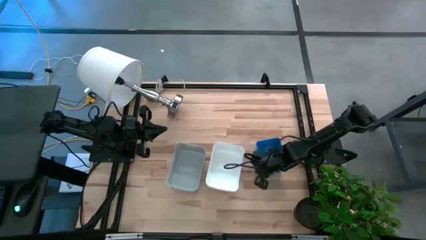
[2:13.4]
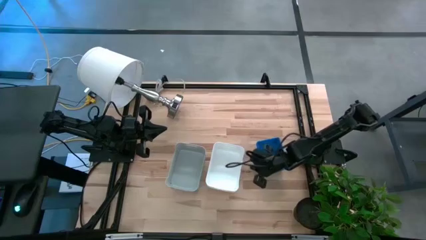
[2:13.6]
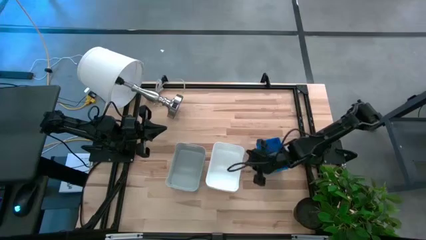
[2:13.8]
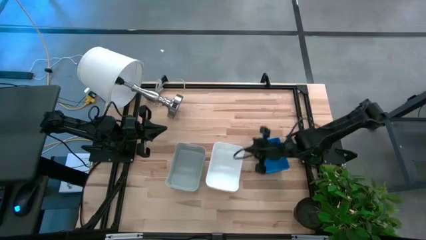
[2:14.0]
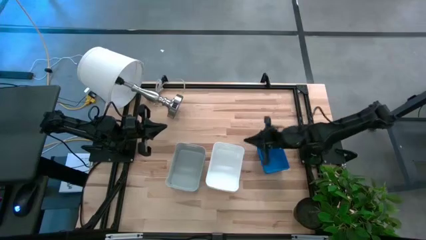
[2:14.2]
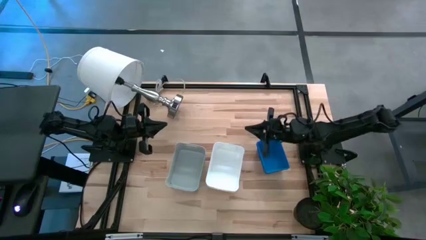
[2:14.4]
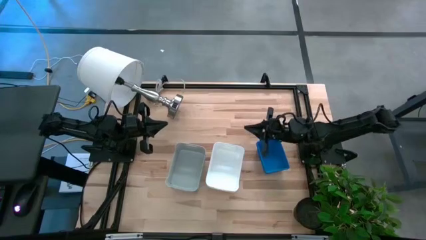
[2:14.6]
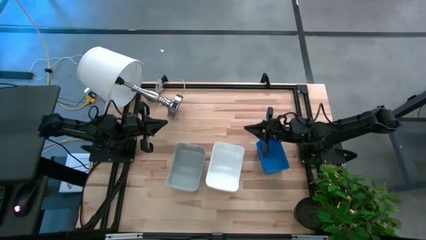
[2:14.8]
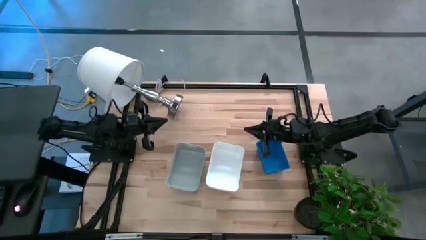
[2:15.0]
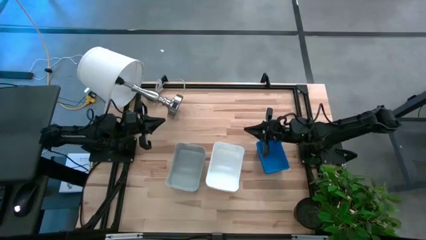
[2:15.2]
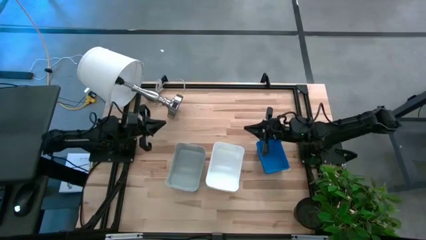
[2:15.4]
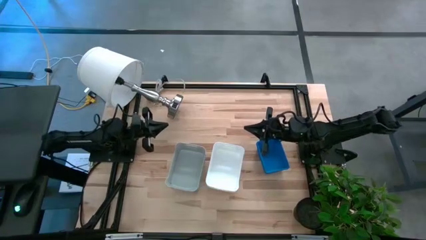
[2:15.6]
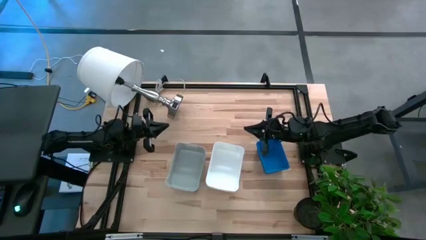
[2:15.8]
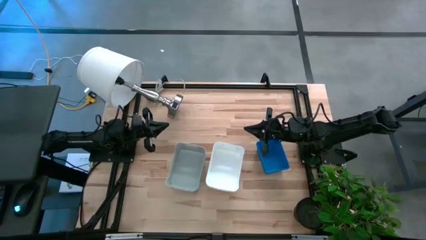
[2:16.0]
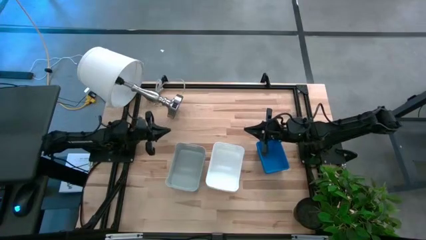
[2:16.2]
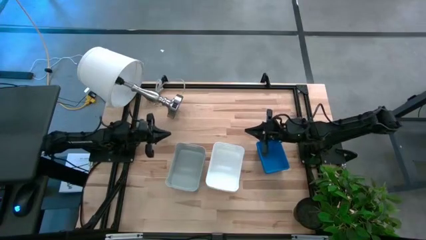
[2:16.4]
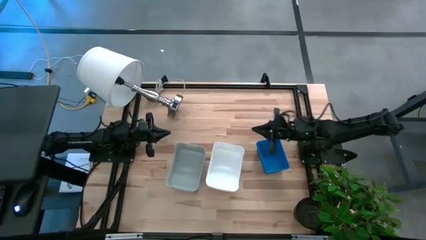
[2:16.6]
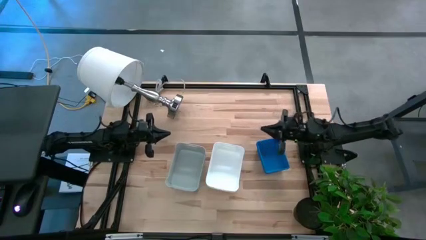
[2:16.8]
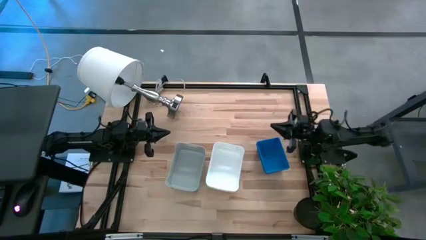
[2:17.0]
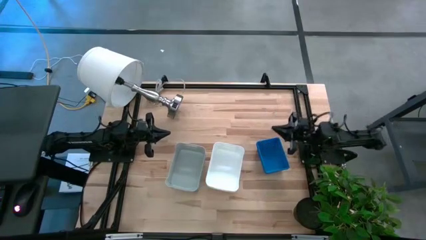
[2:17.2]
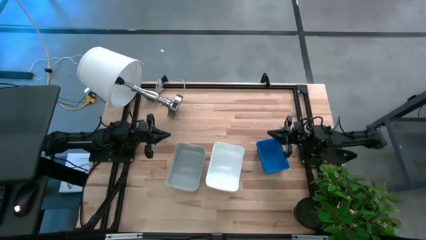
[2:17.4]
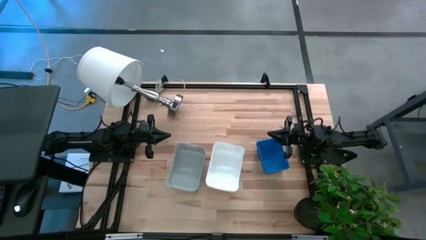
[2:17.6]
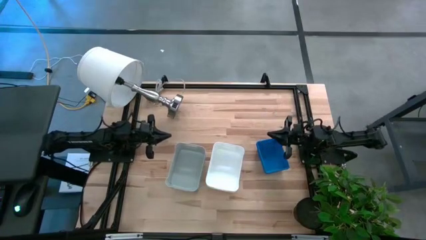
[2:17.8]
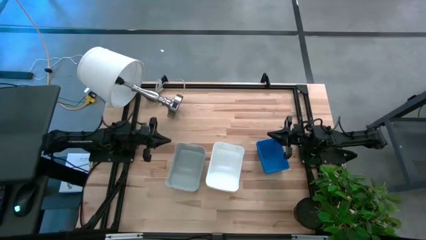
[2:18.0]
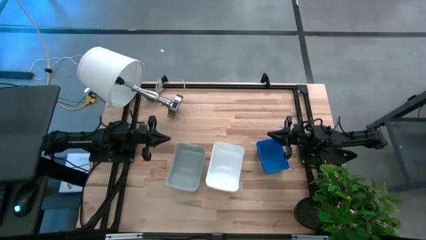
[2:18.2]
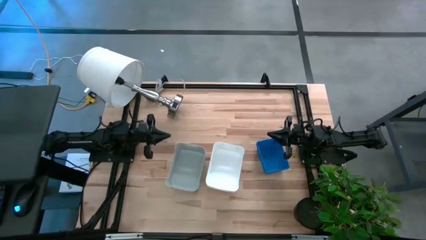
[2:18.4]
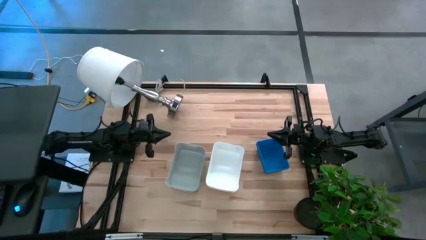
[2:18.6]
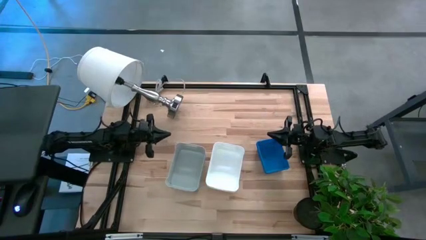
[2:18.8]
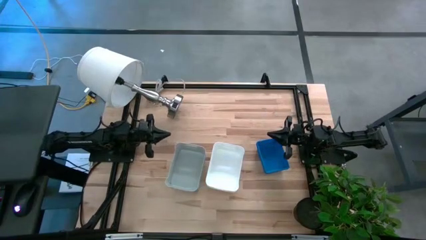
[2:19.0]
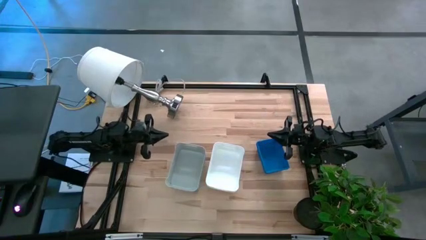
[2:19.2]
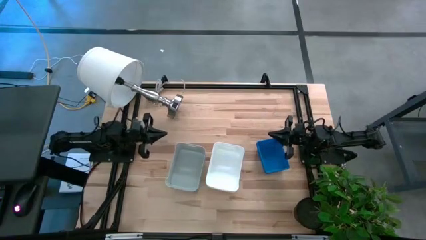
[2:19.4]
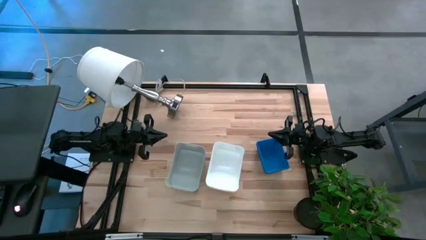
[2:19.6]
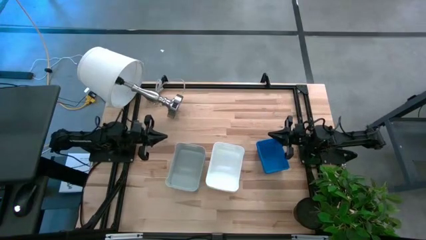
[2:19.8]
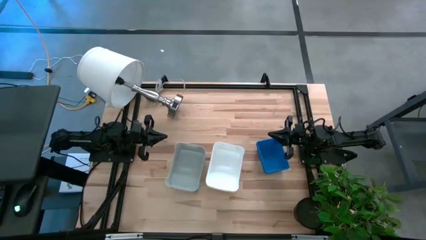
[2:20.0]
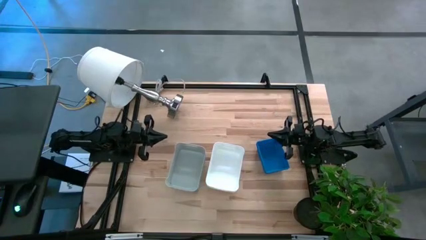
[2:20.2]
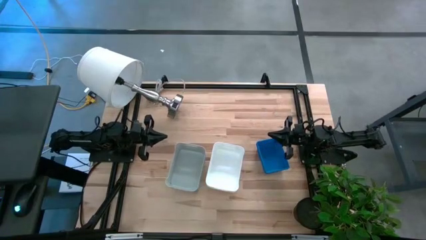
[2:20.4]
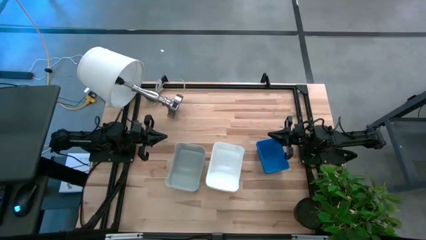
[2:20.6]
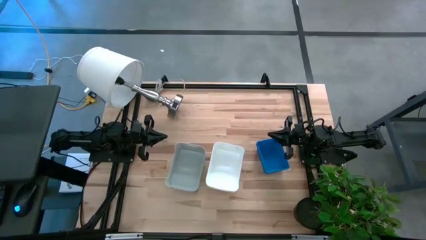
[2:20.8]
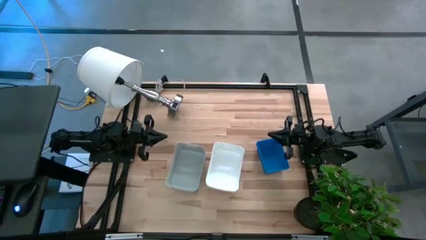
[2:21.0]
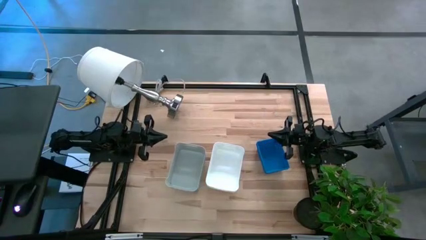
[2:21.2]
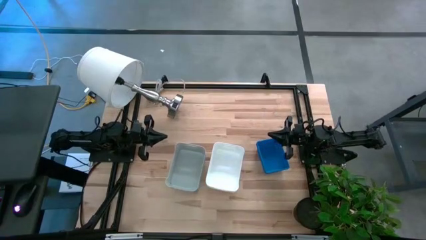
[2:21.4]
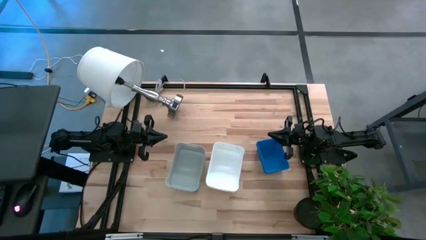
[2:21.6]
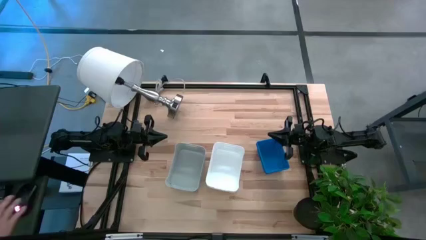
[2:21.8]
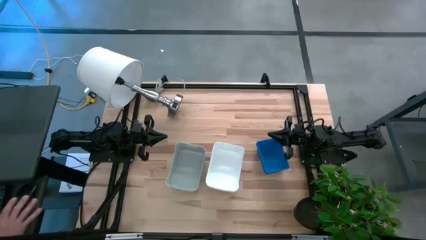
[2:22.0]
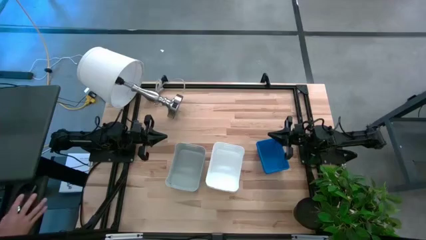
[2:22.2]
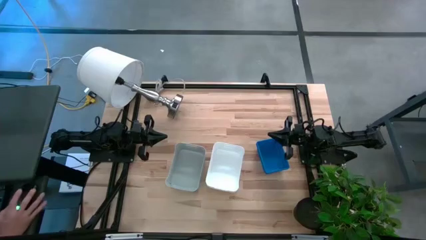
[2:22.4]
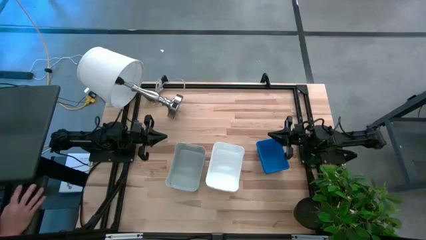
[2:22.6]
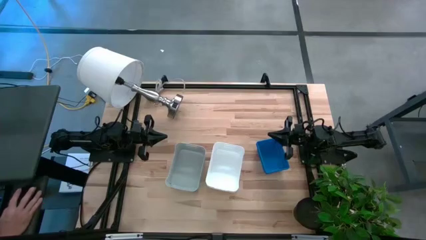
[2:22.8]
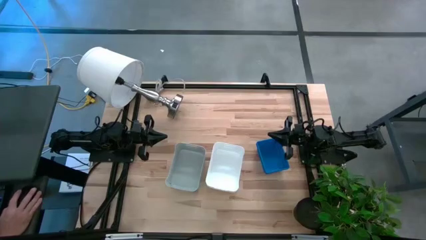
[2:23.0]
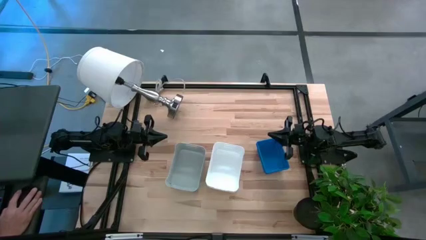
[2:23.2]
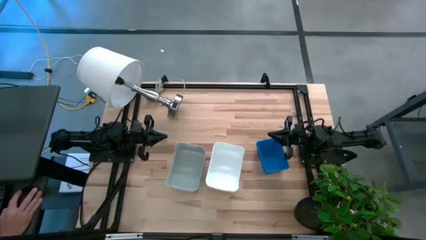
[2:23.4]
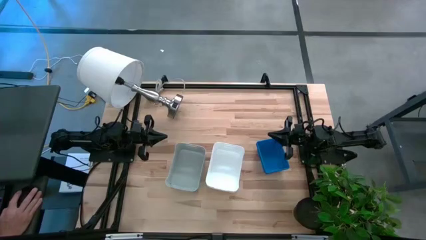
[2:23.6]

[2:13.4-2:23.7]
Return to Home Position
